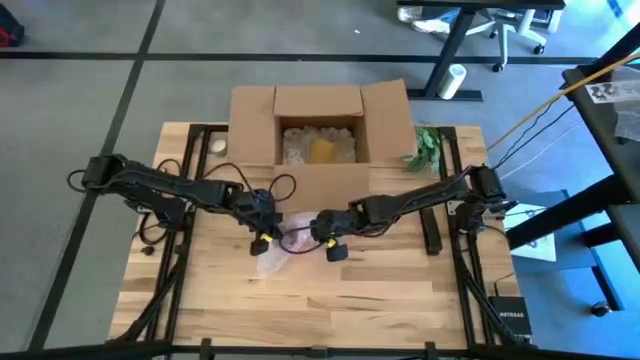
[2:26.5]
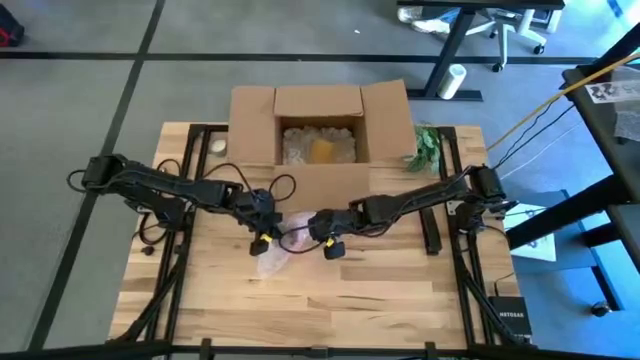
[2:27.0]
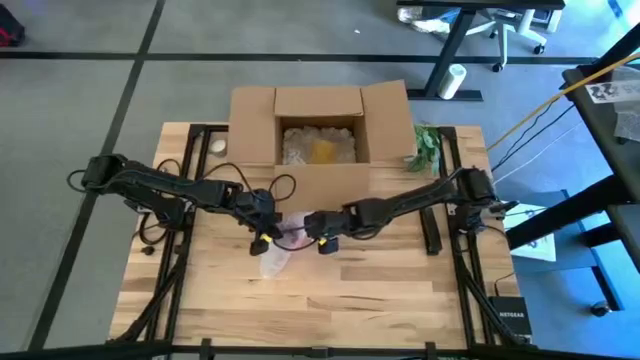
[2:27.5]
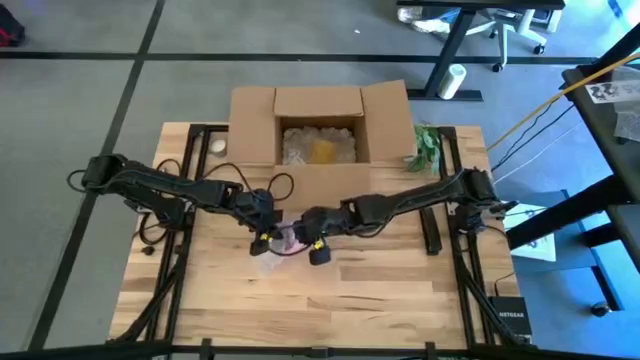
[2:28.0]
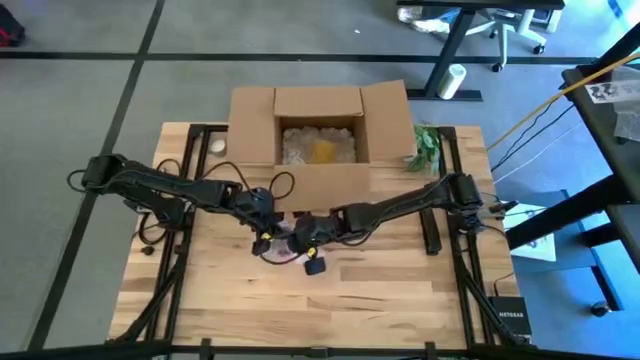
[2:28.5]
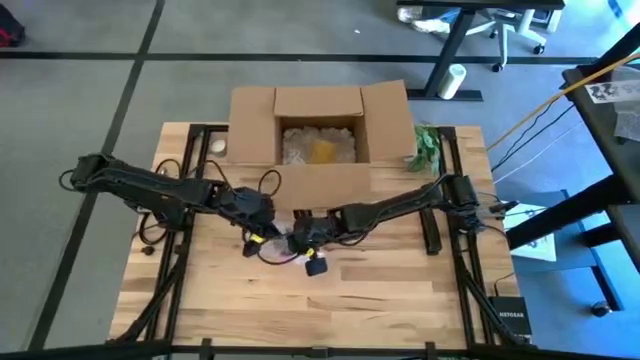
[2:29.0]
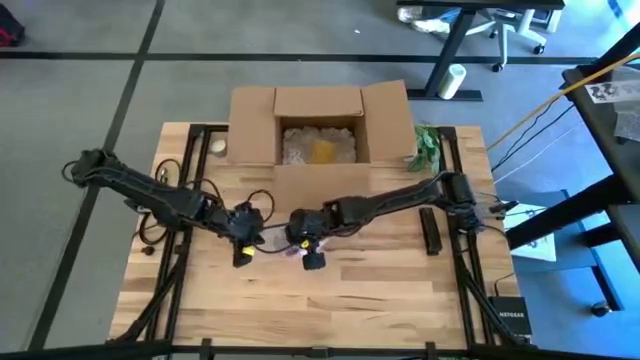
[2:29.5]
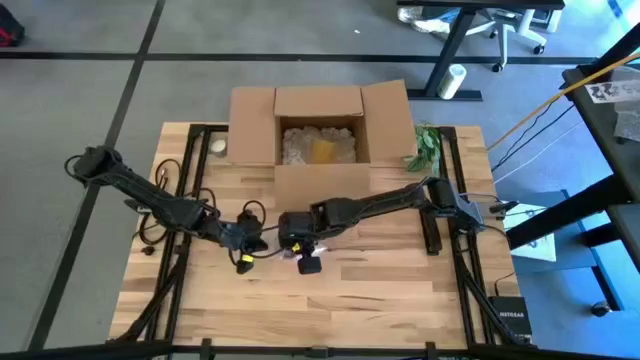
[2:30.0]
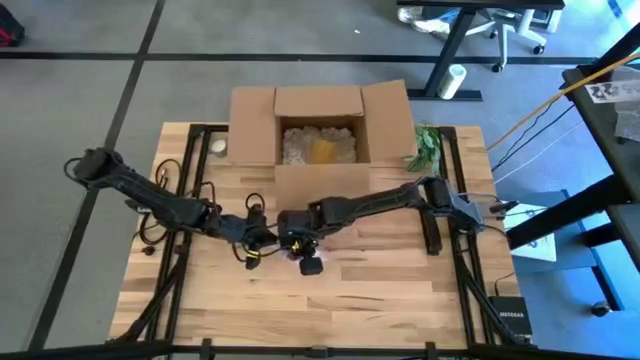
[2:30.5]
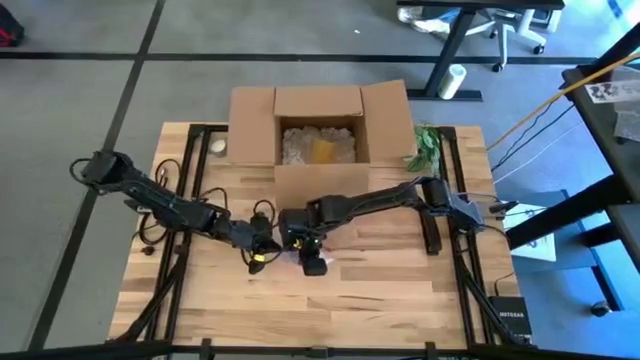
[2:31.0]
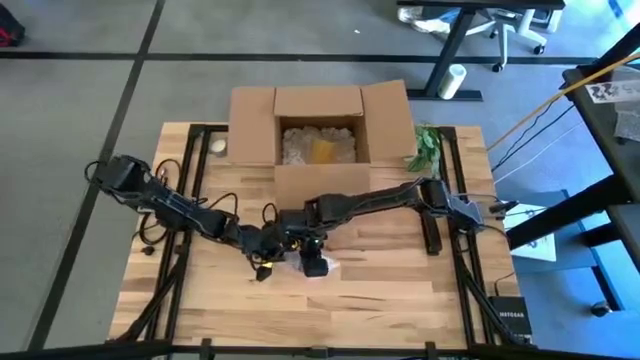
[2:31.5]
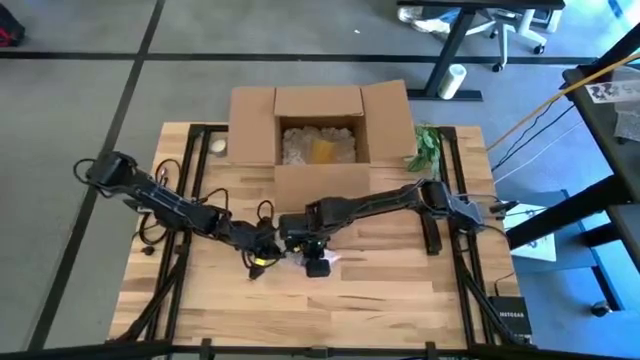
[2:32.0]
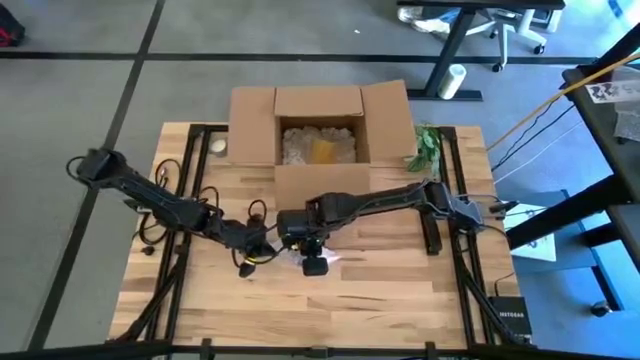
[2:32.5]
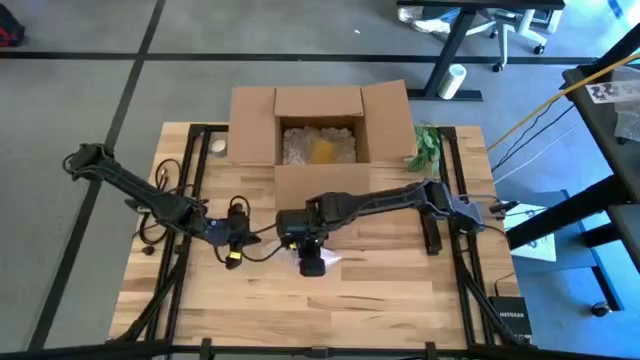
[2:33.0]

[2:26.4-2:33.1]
Task: wrap mug
Wrap the red mug with the transparent bubble wrap

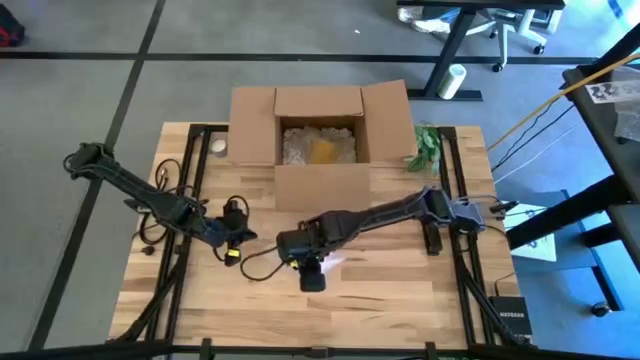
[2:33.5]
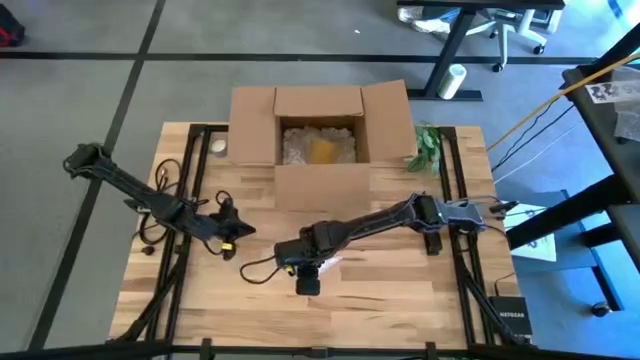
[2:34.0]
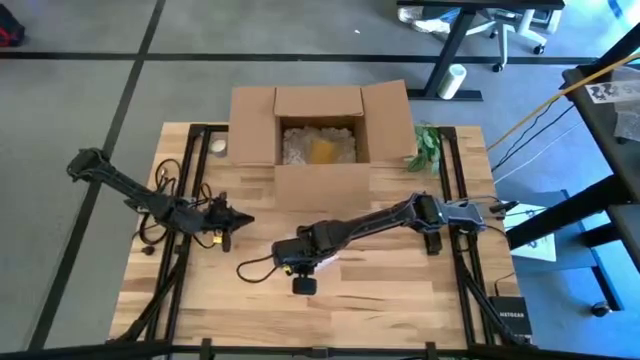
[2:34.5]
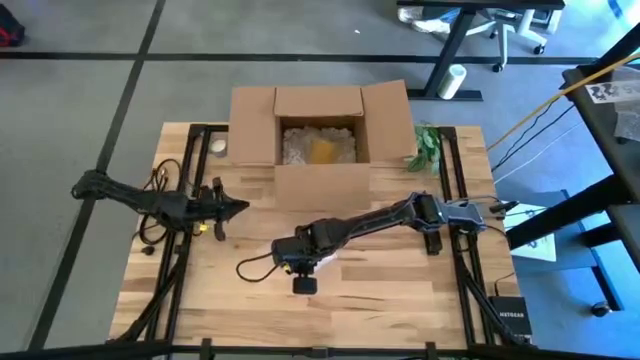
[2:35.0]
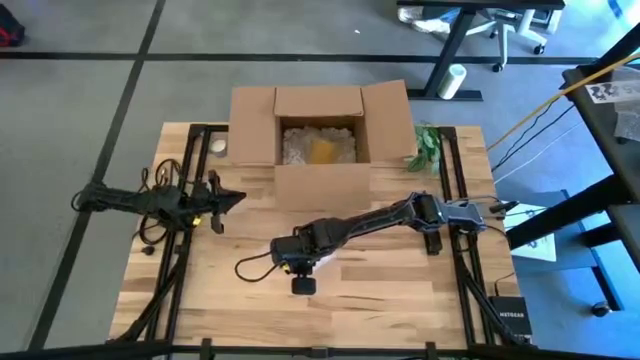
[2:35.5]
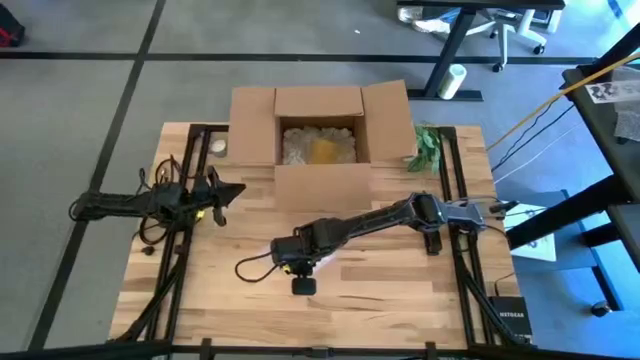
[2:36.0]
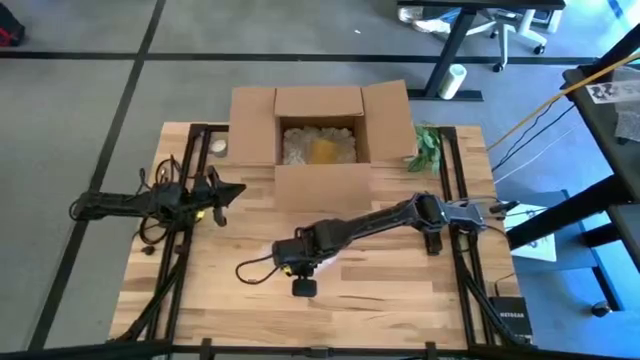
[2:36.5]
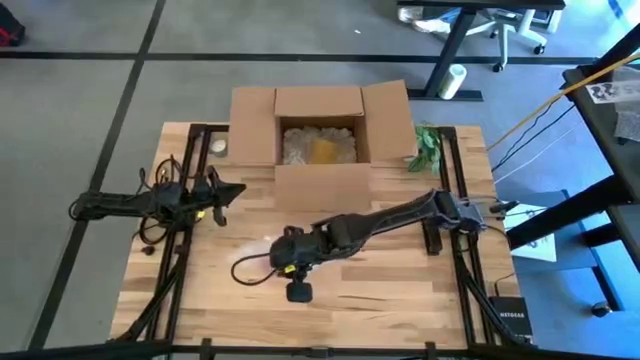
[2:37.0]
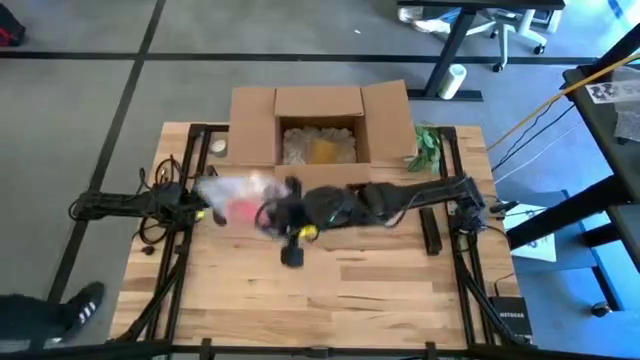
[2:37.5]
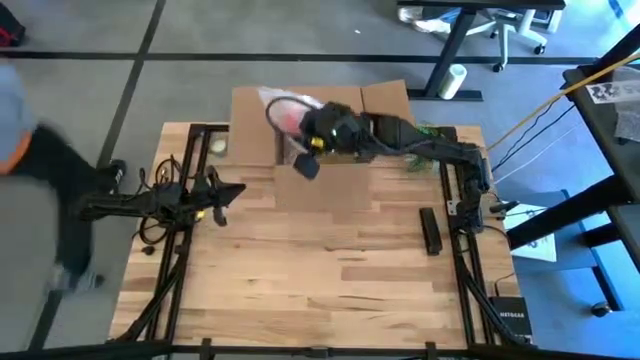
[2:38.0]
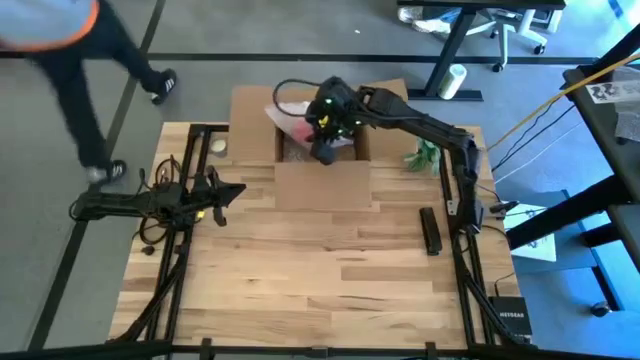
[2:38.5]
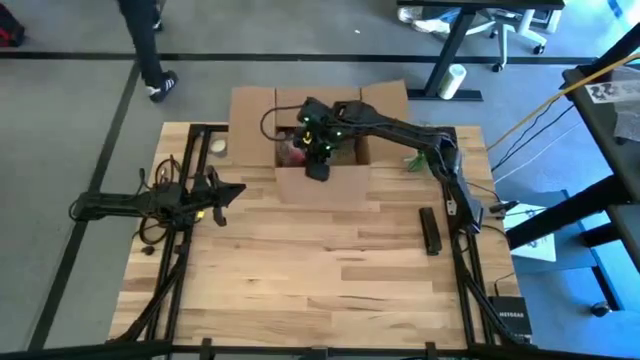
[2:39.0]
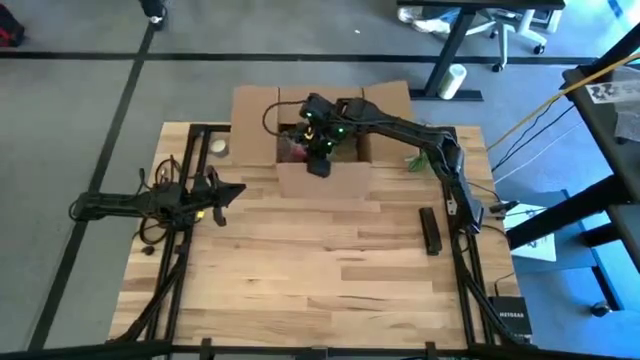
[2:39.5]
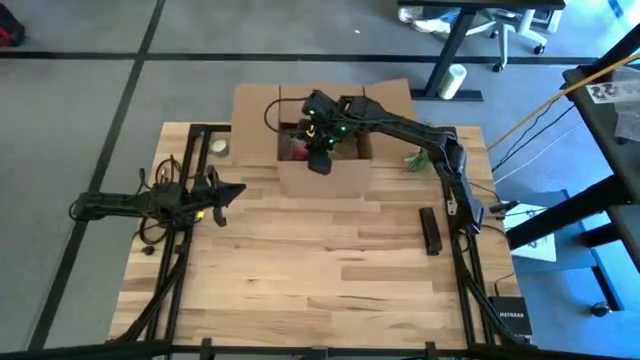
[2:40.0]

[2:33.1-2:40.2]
Put the wrapped red mug into the cardboard box

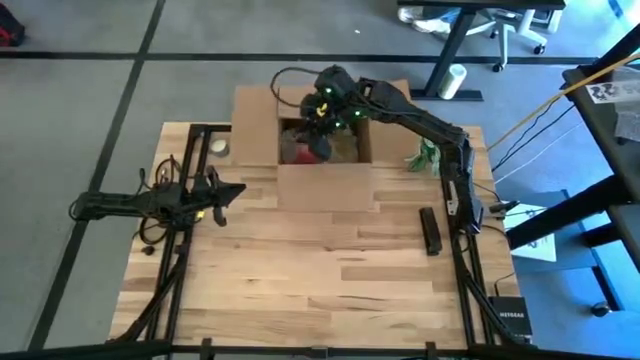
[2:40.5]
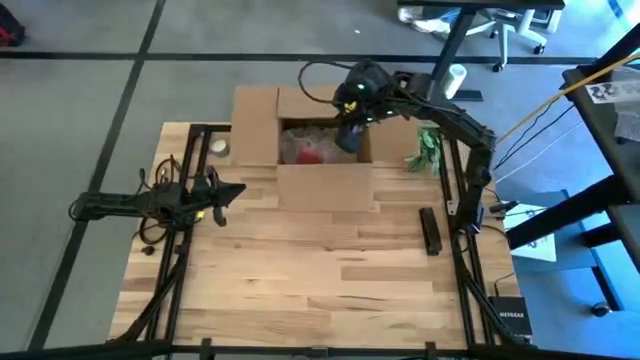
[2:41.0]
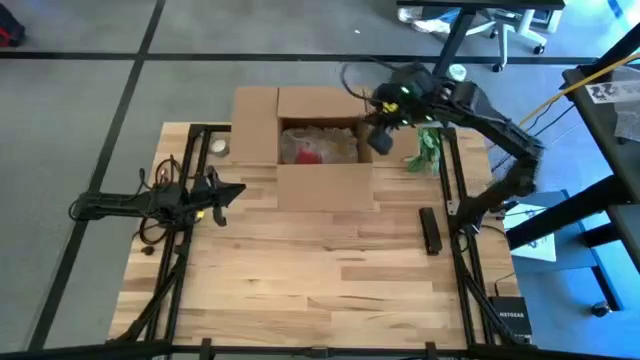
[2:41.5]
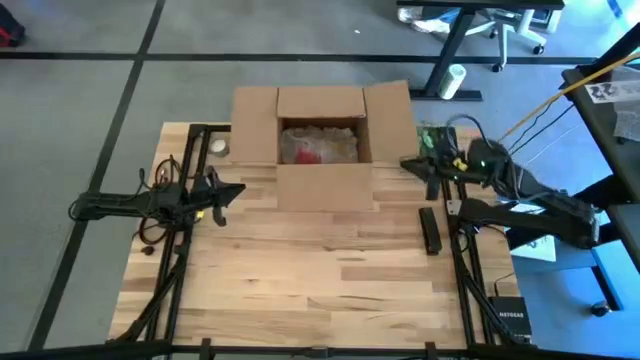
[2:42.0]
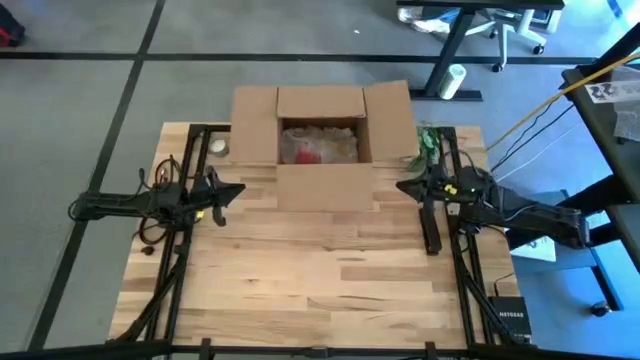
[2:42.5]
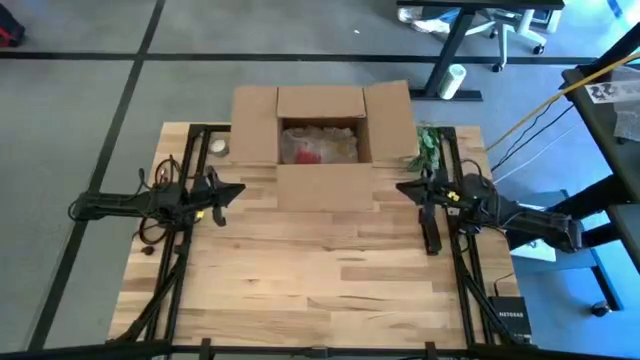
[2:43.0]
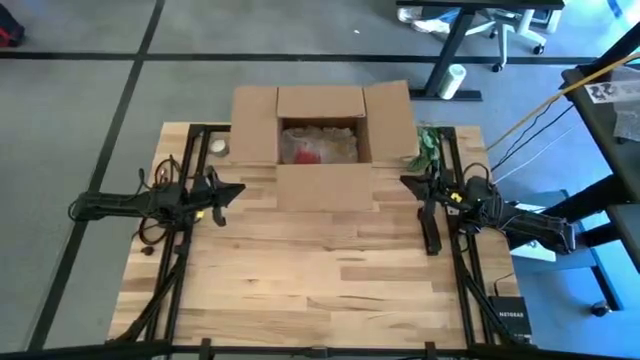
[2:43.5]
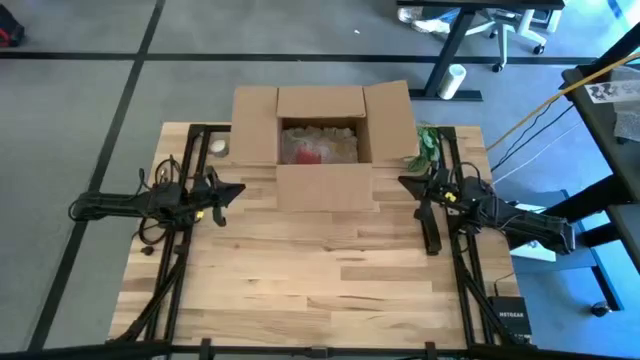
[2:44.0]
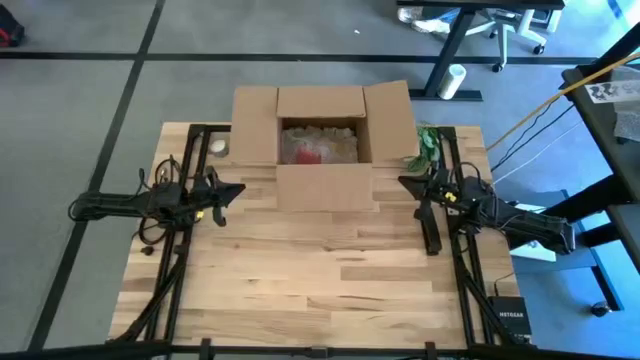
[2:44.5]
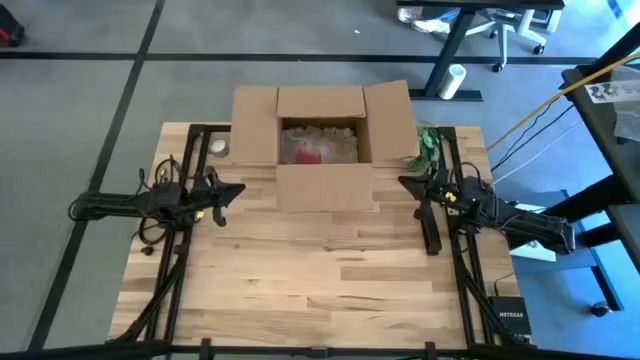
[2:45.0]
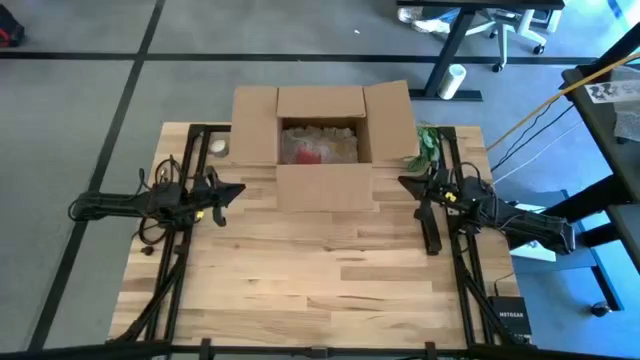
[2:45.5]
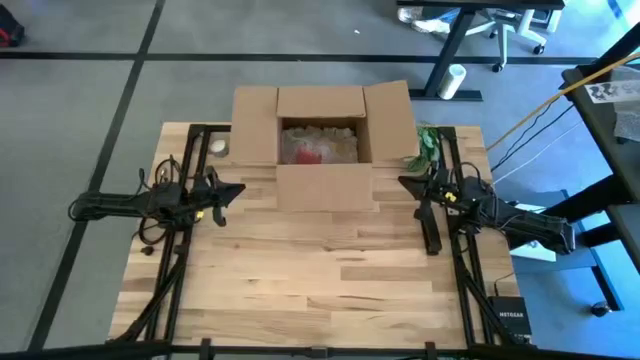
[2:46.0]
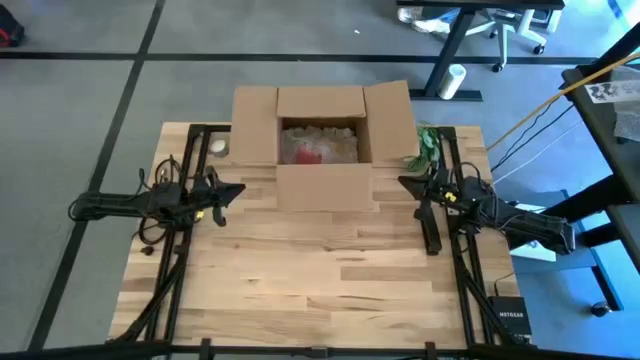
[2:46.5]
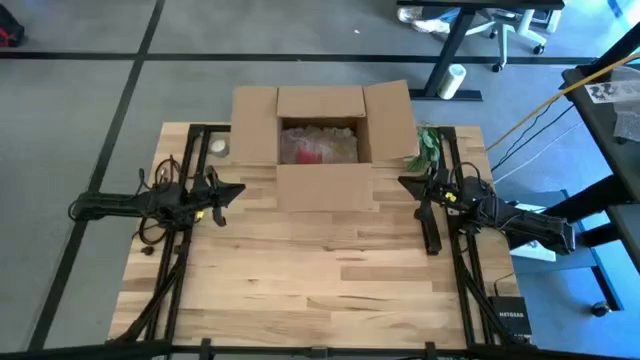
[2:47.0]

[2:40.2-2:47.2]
Return to Home Position
